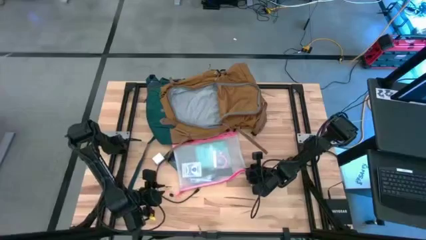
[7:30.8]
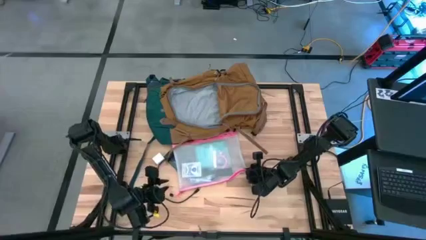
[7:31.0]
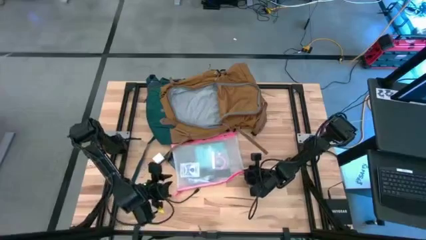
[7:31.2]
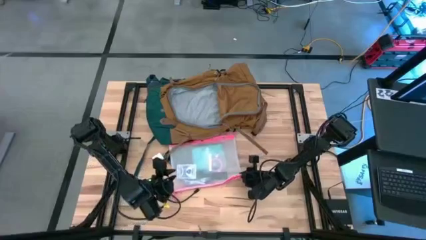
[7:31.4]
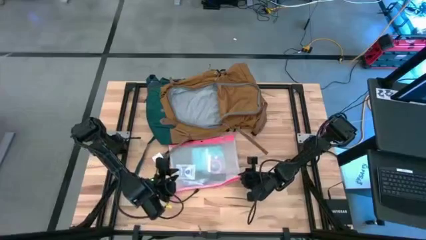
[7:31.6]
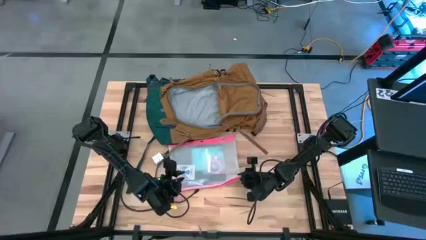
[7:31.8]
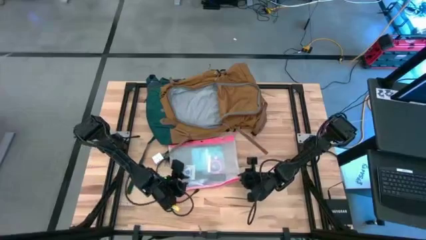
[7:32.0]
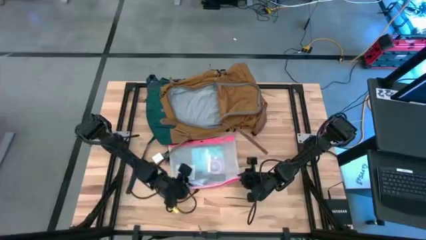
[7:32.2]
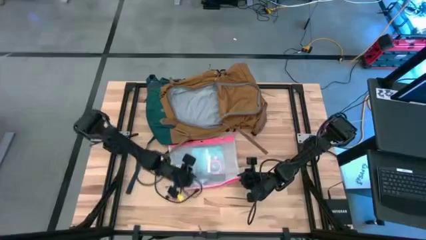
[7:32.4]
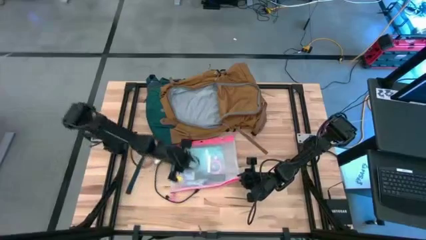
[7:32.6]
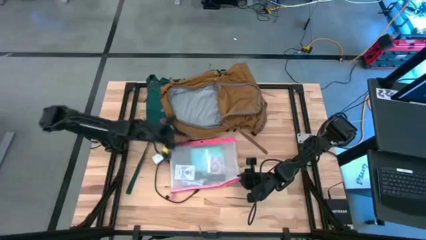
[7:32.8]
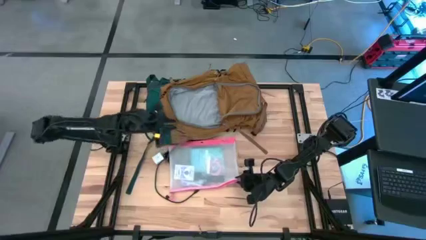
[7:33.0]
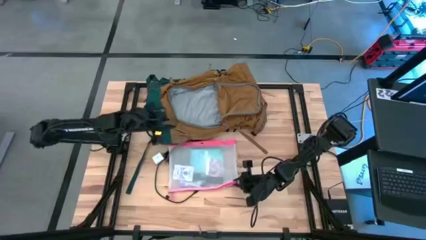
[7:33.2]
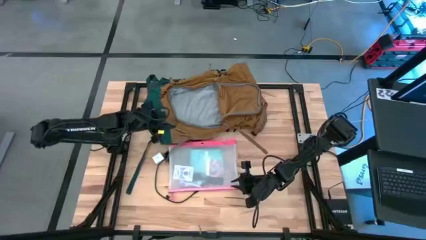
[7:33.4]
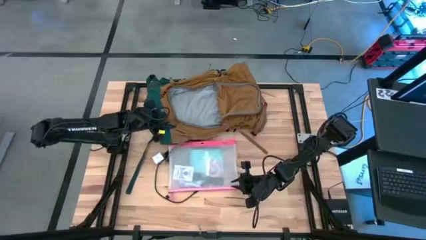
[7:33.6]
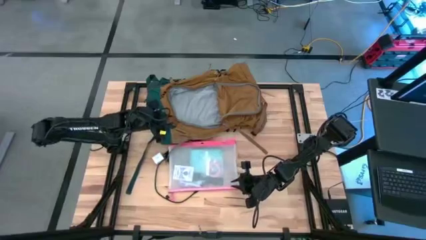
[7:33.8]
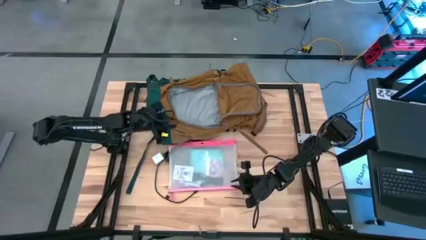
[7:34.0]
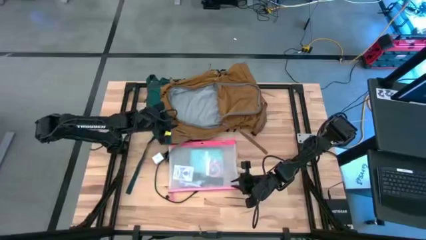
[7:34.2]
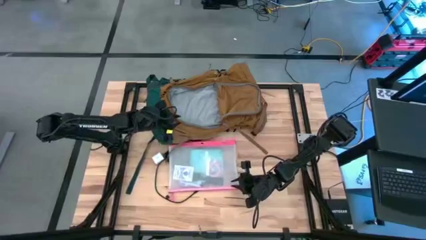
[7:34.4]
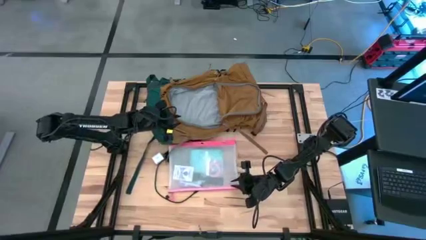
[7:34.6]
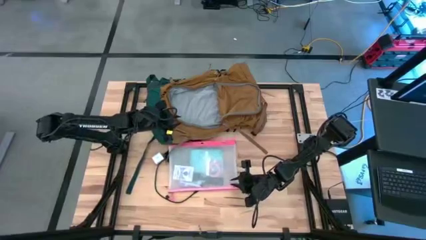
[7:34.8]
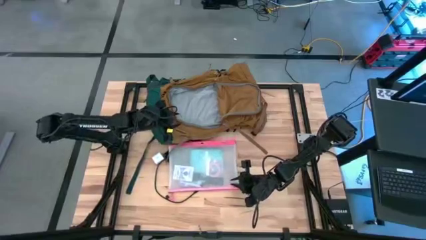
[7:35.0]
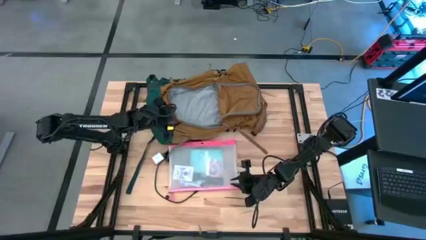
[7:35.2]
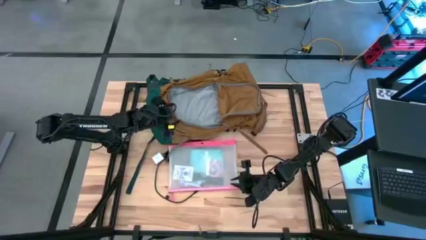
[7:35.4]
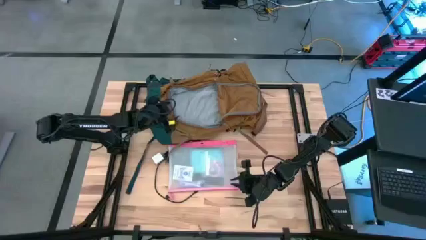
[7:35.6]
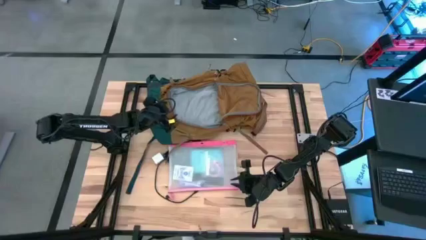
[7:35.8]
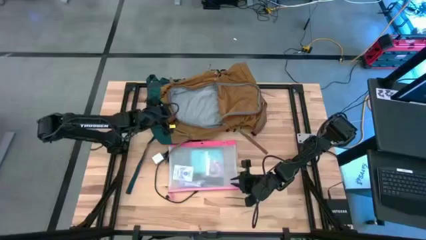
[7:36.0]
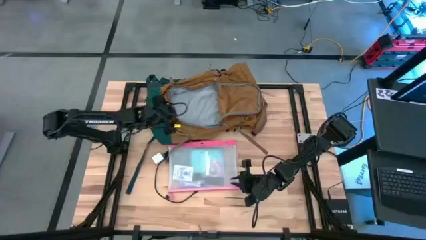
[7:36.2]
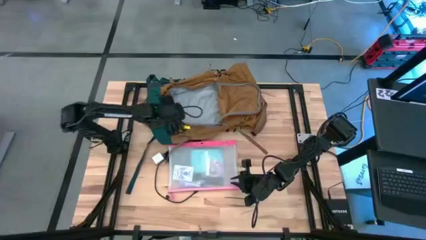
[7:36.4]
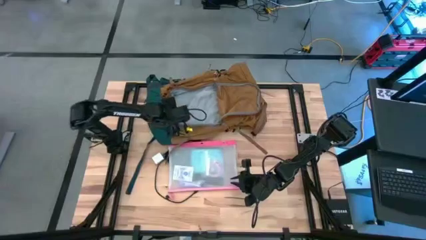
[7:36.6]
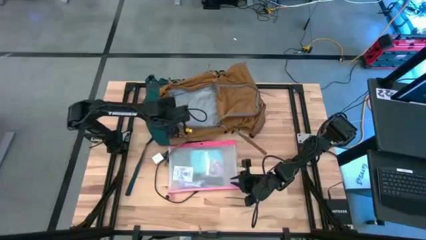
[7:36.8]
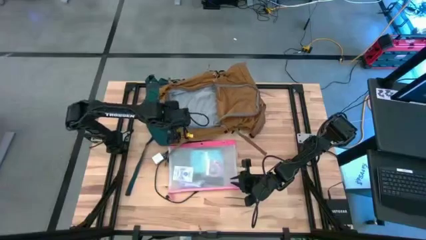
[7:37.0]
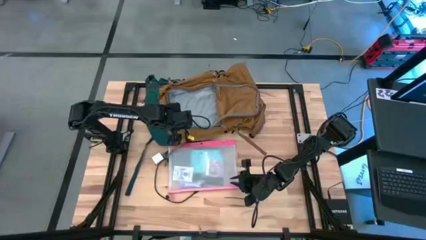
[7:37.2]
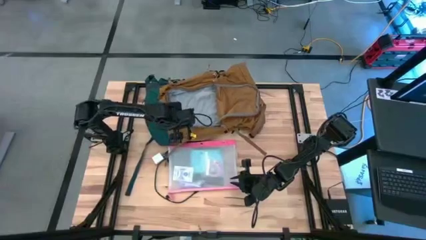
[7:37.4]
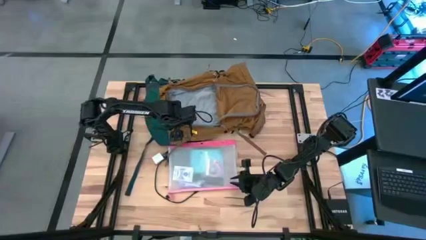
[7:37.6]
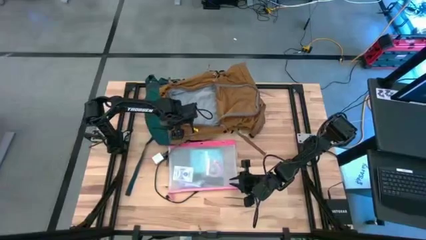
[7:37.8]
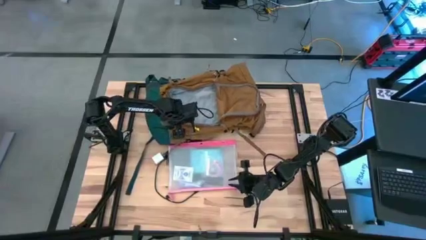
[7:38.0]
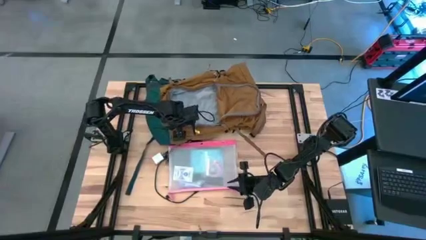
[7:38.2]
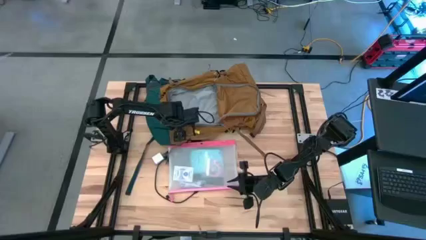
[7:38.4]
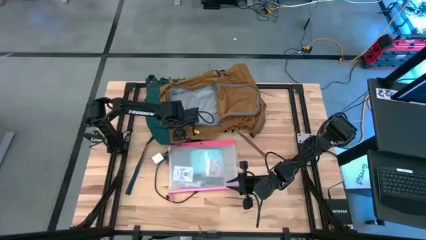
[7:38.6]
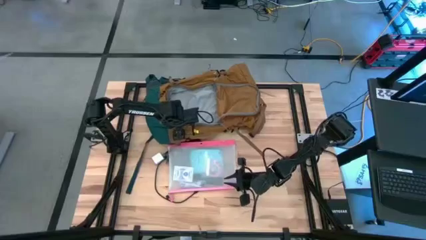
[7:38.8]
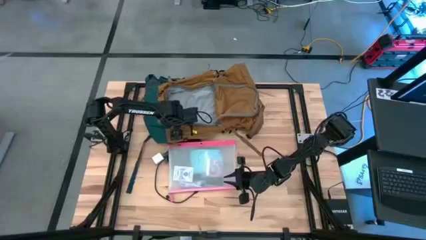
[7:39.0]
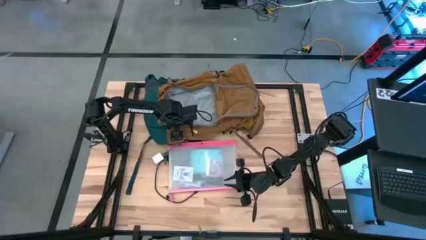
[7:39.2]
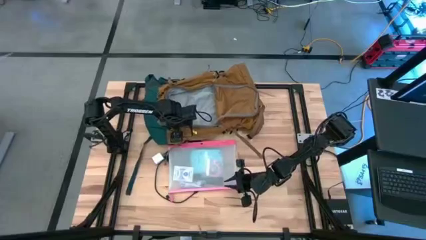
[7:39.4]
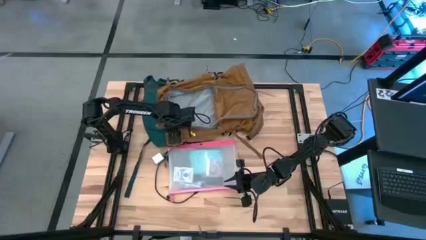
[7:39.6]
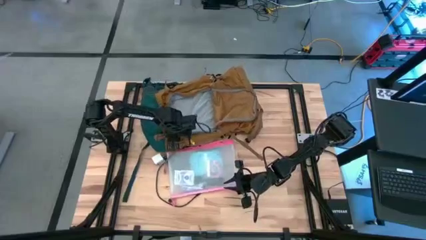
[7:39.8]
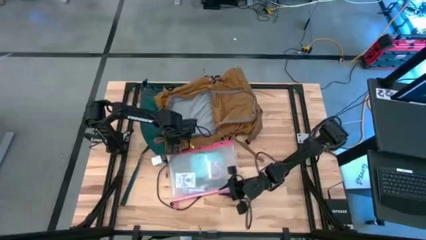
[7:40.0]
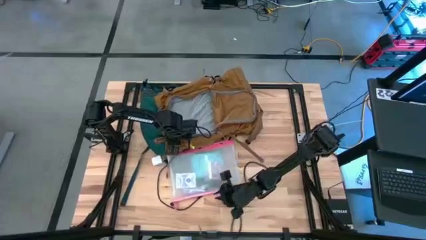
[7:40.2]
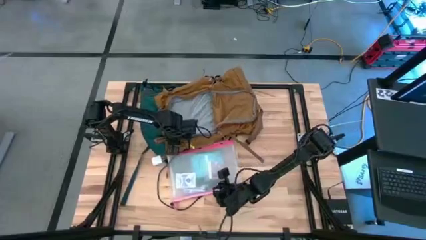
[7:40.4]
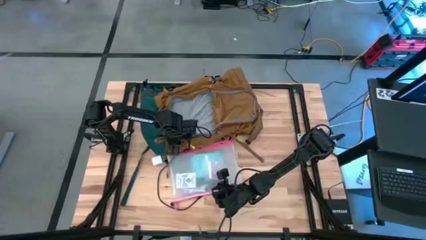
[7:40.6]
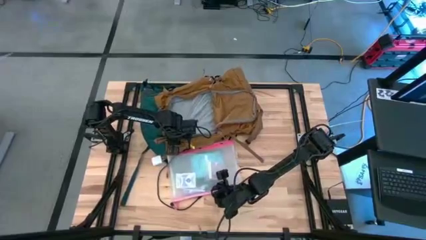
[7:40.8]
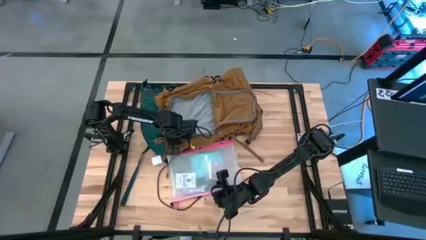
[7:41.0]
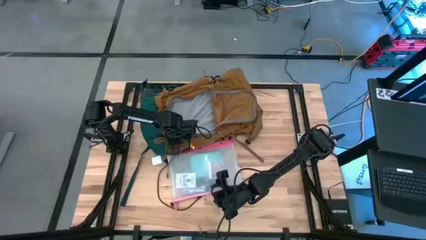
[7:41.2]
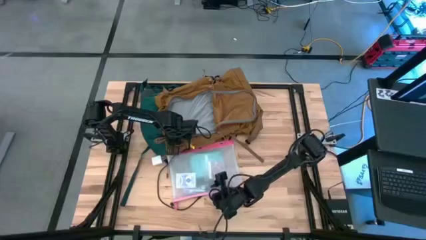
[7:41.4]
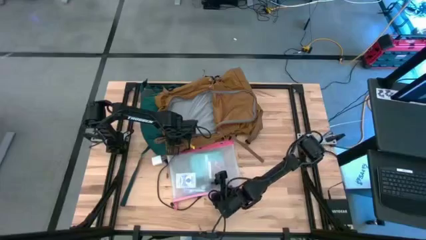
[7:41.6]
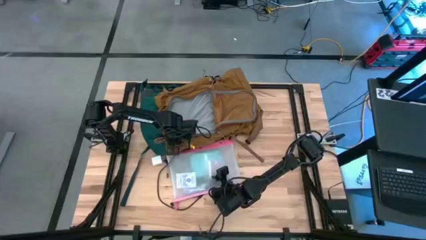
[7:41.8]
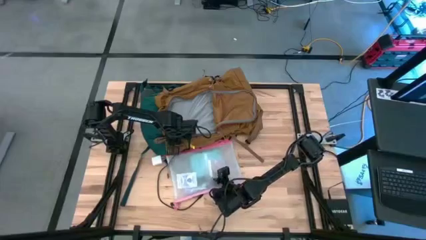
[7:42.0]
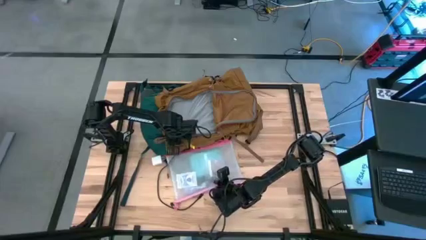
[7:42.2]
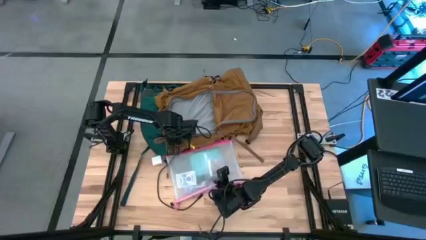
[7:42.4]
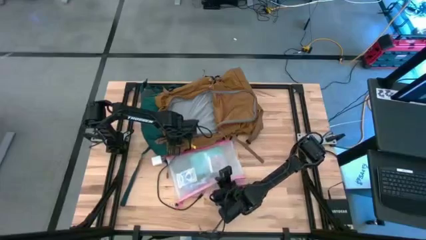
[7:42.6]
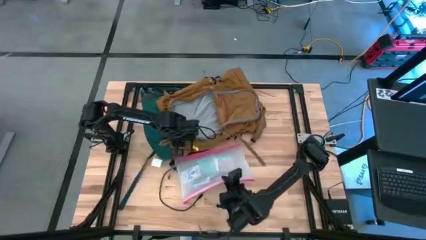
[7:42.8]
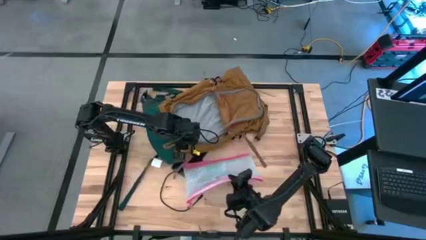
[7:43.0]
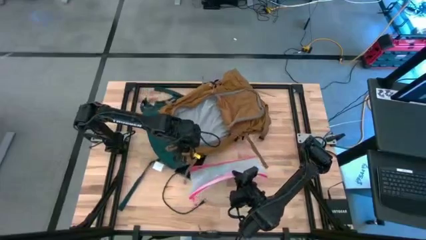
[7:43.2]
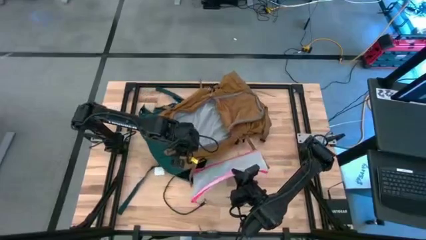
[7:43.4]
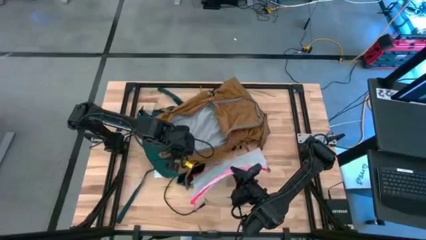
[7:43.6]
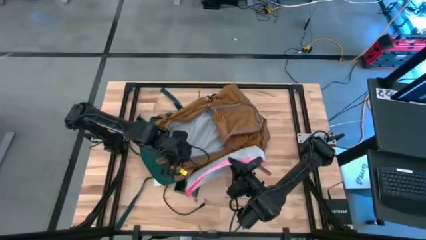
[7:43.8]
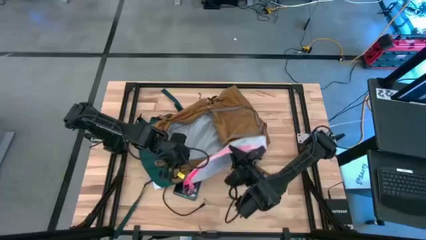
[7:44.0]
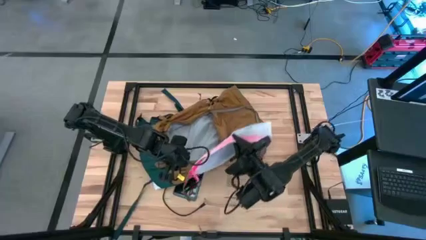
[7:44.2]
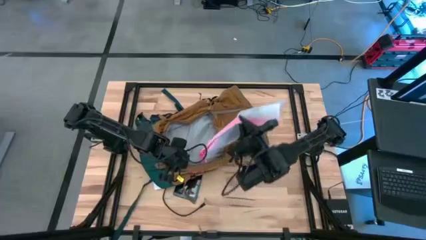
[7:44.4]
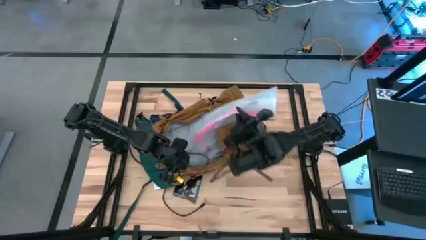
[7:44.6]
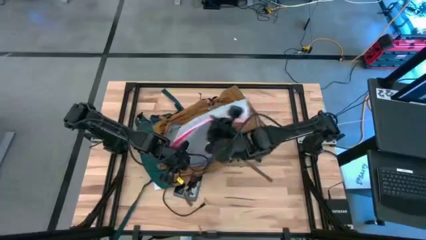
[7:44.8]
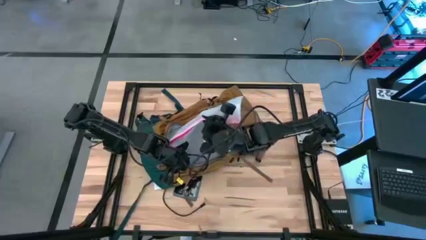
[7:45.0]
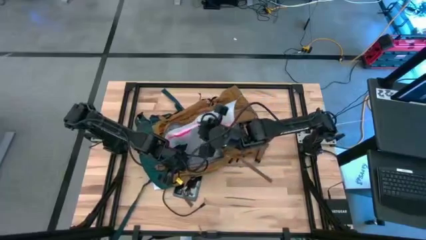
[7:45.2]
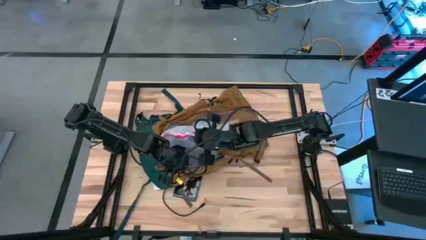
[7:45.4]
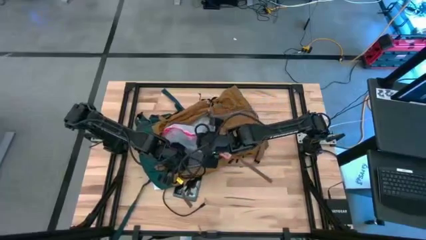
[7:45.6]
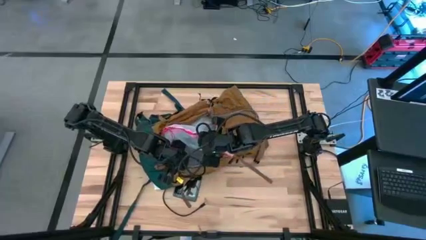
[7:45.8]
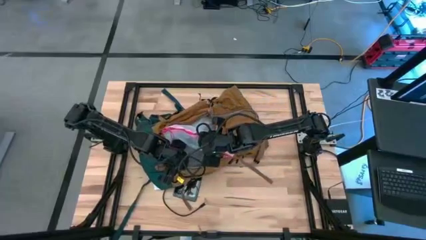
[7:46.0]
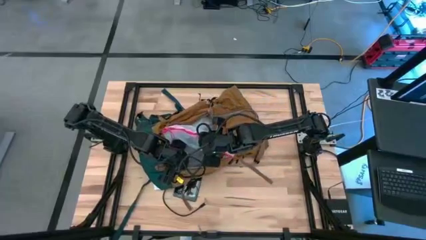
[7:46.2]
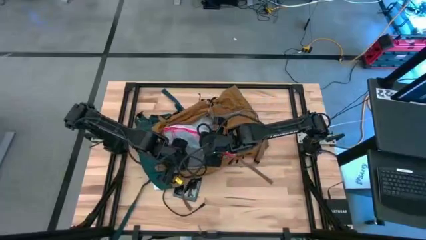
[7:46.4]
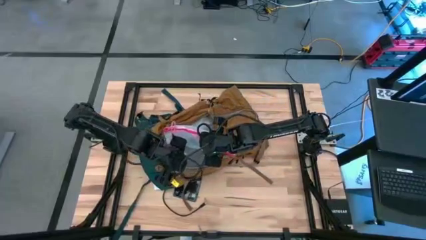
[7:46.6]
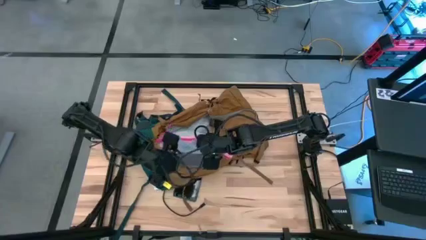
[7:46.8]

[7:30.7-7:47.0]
Task: Unpack backpack
Put the pink zipper pouch into the brown backpack
